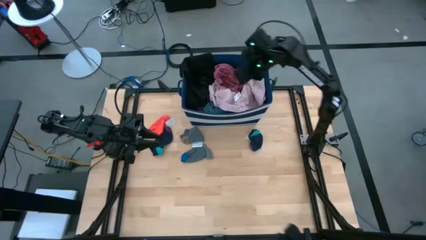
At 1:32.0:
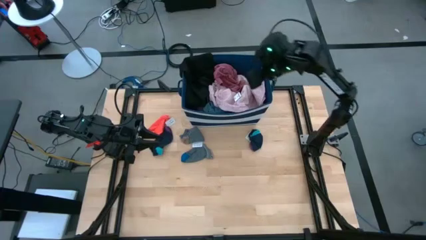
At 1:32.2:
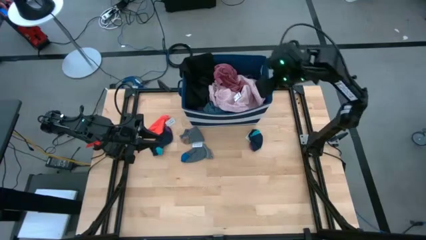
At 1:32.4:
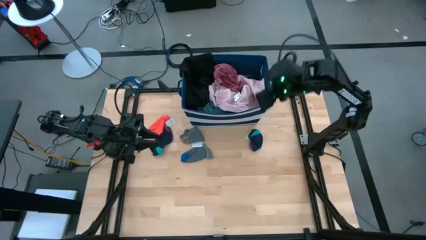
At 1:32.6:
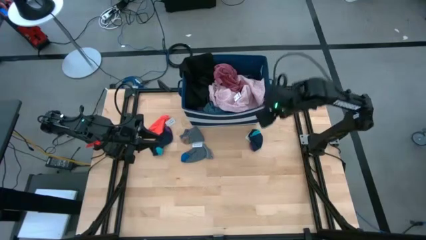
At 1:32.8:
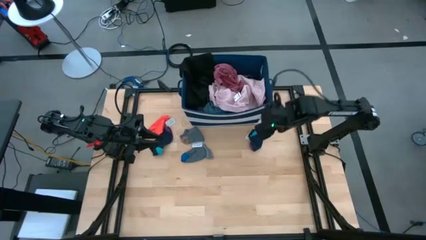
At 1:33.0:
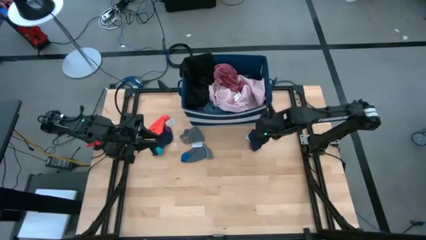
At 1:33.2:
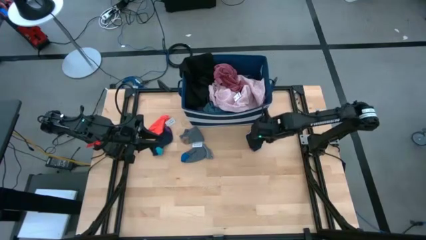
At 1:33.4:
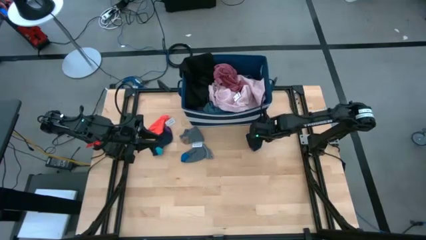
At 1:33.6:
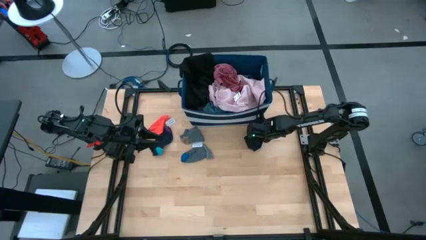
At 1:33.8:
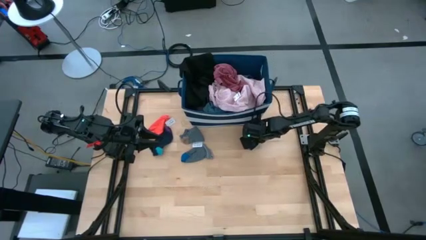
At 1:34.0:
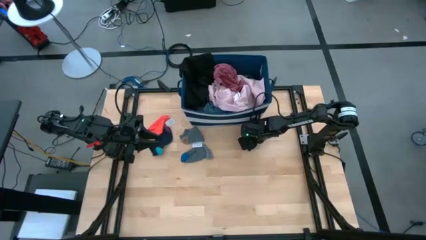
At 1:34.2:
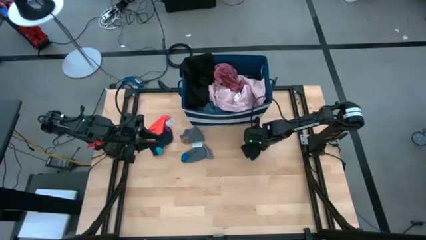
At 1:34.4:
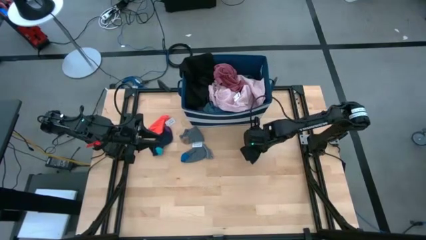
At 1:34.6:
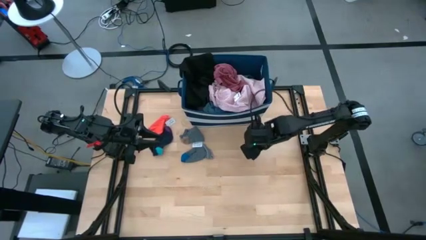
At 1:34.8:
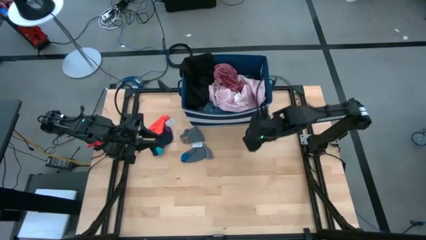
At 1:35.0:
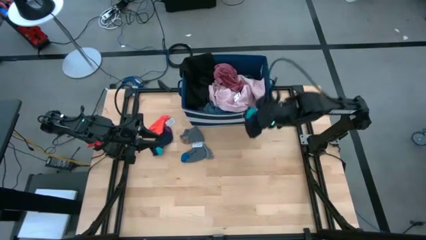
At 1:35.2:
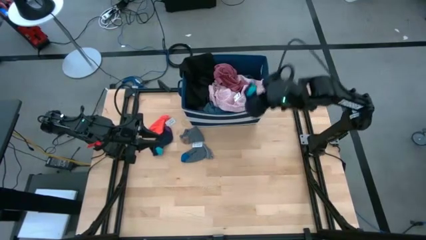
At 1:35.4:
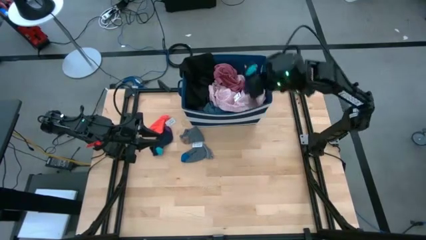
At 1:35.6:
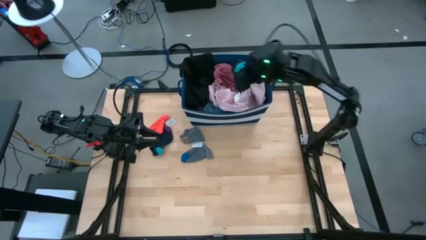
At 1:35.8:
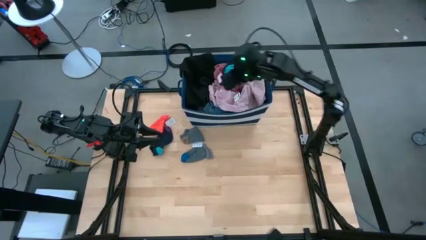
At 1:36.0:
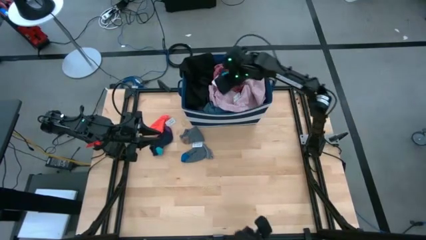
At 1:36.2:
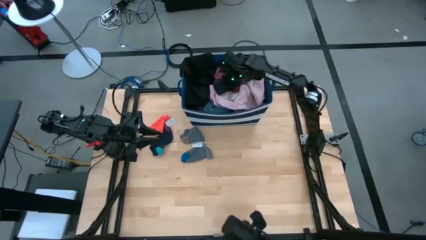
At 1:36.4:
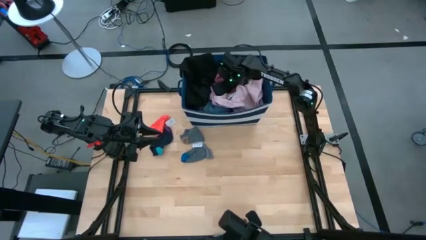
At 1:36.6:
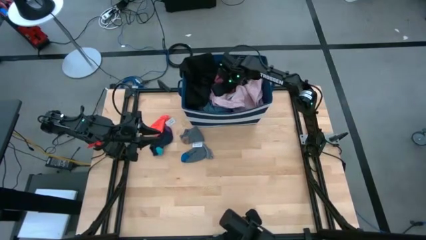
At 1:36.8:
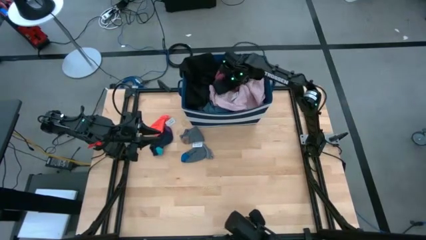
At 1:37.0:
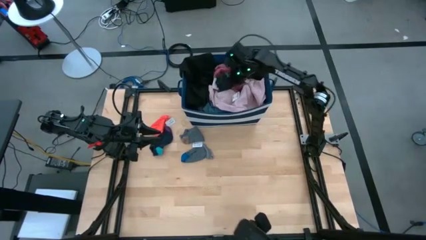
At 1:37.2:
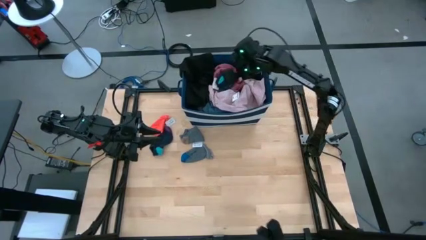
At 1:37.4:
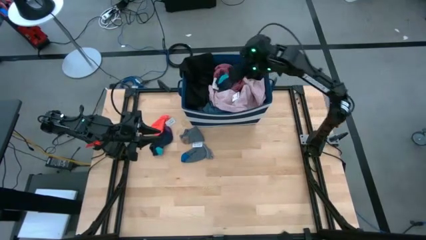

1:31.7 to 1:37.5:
Task: Sort clothes
Put the black sock into the blue bin

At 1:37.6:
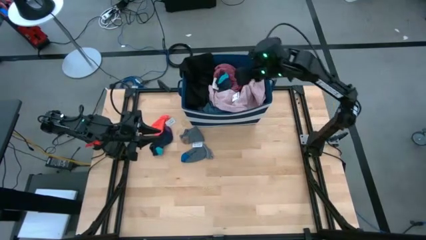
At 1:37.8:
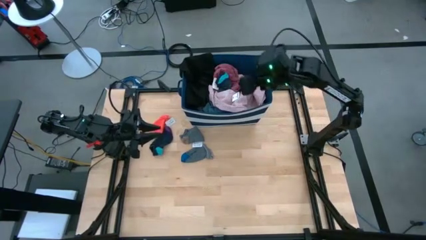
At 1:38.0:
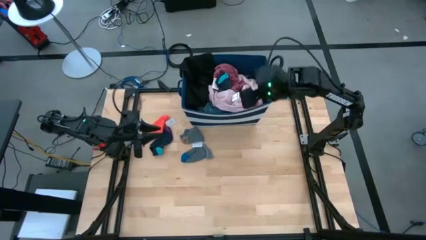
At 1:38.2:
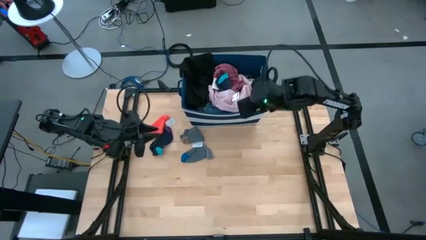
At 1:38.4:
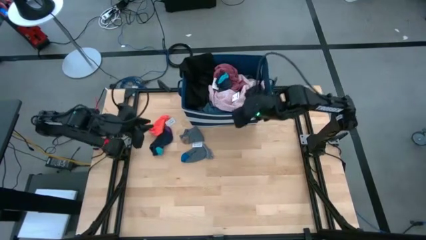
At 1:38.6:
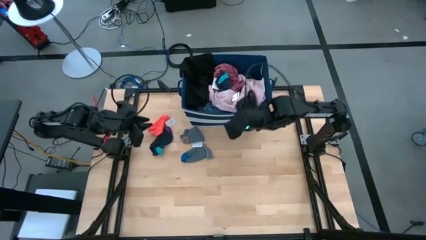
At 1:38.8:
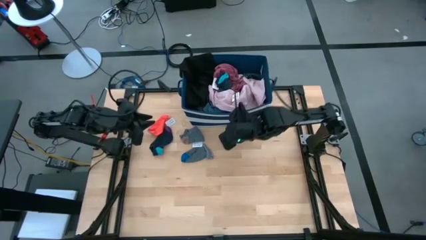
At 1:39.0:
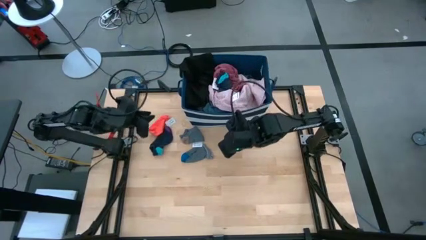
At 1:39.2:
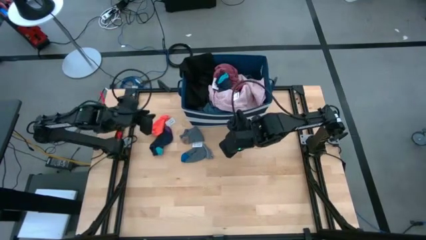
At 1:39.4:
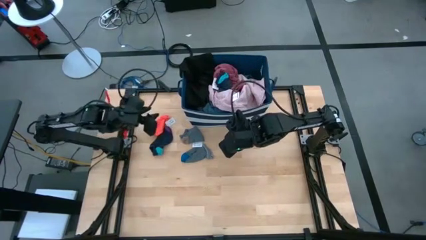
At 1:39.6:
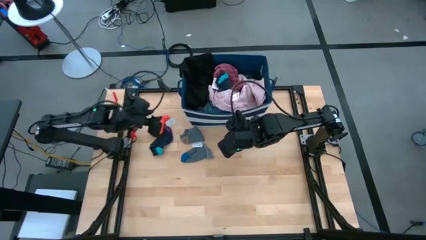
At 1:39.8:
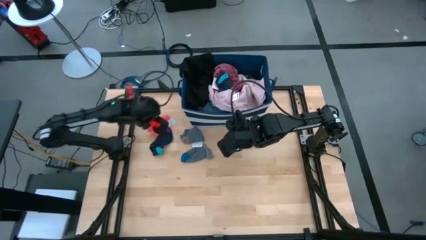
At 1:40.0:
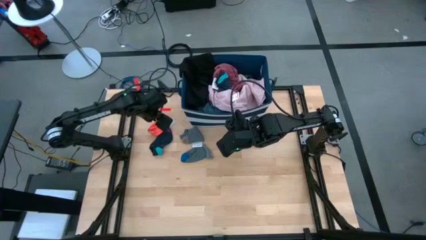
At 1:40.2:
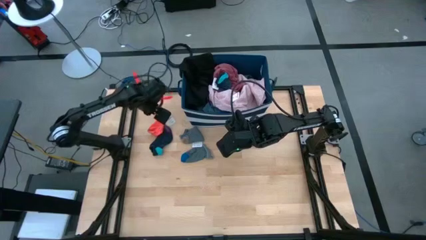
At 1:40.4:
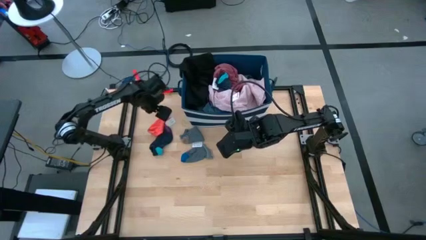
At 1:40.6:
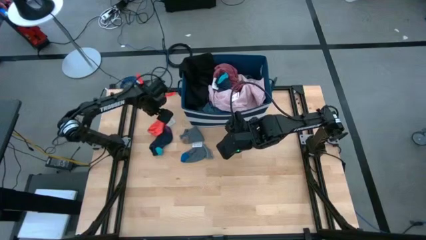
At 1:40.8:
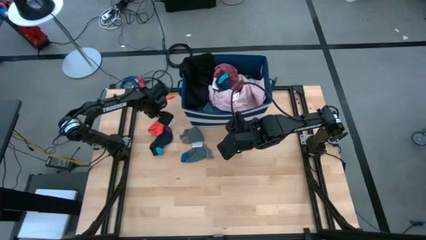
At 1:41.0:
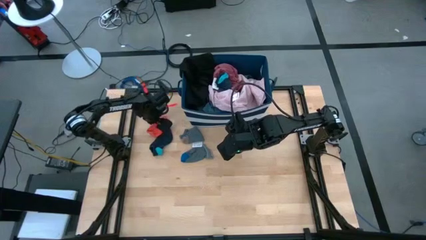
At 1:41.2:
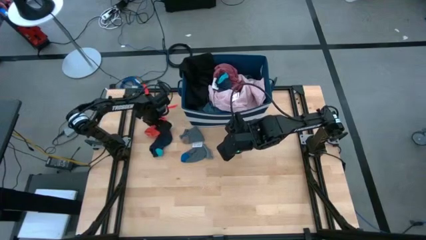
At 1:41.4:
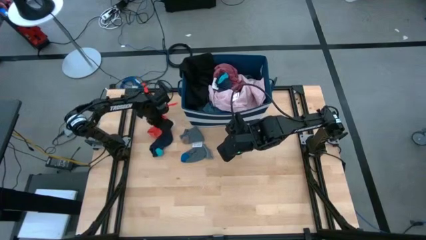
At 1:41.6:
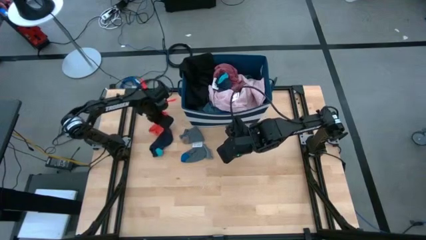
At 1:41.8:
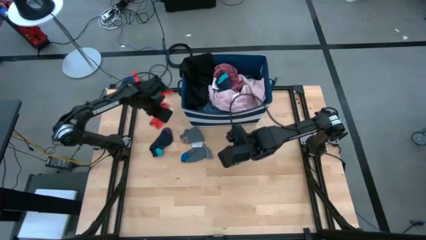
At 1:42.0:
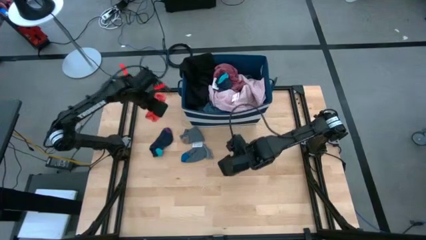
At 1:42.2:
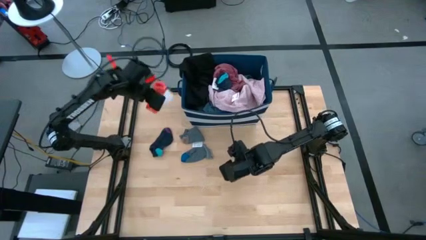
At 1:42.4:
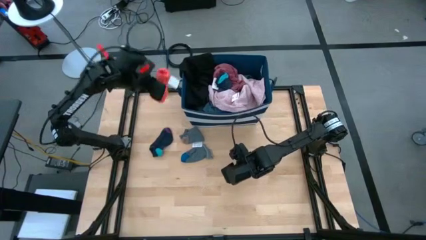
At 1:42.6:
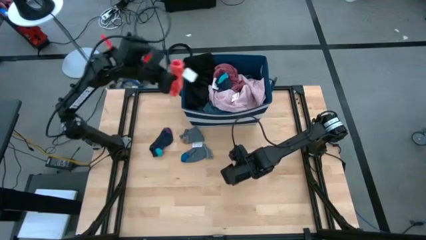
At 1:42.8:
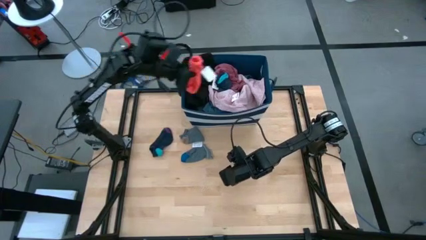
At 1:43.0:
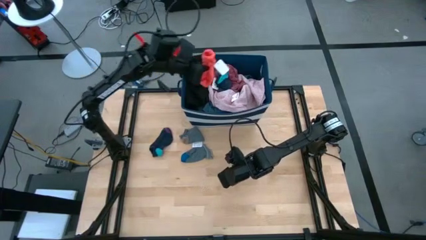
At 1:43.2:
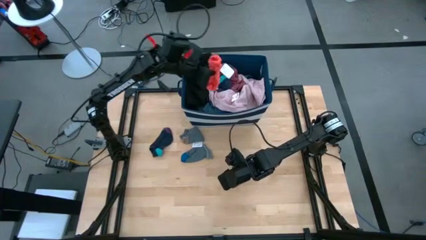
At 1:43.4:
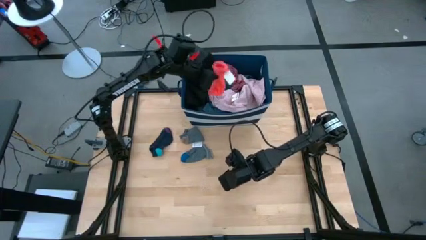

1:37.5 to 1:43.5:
Put the orange sock into the blue bin

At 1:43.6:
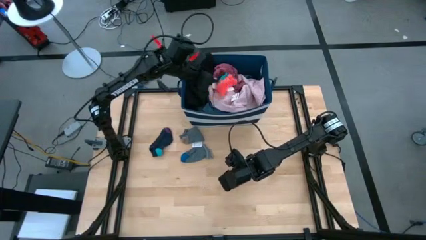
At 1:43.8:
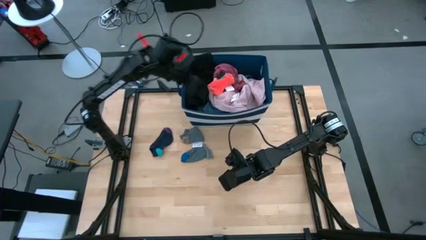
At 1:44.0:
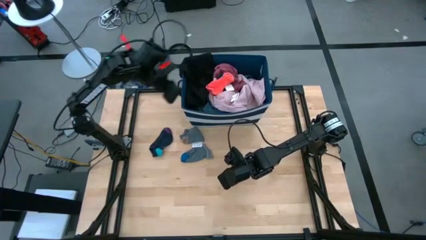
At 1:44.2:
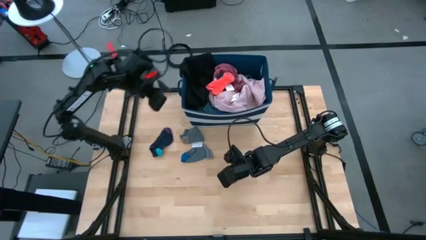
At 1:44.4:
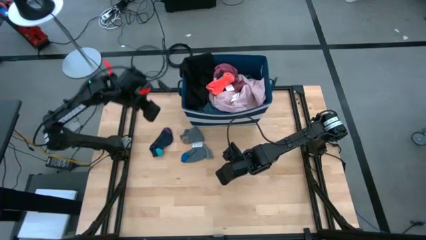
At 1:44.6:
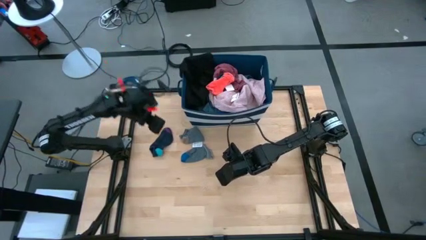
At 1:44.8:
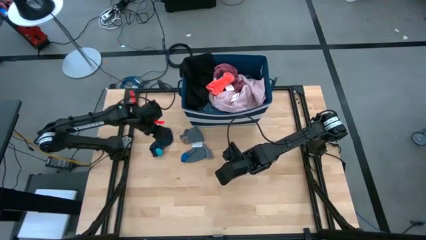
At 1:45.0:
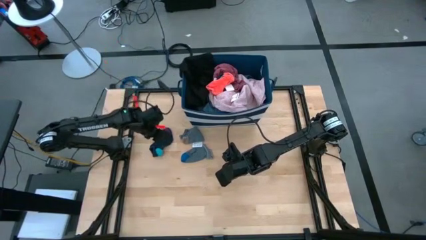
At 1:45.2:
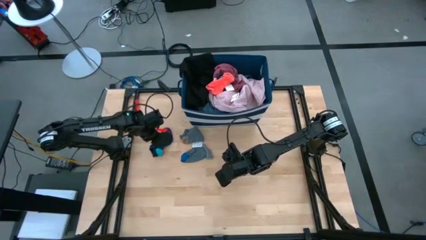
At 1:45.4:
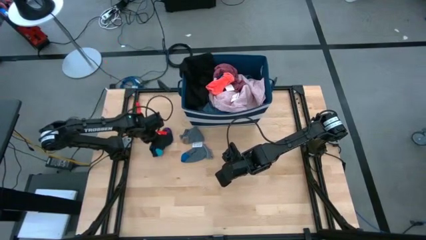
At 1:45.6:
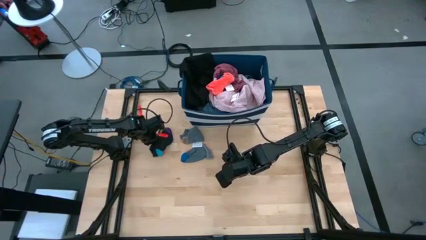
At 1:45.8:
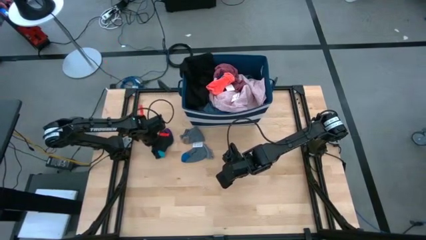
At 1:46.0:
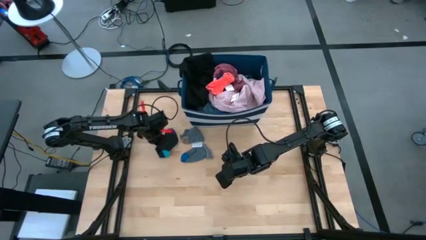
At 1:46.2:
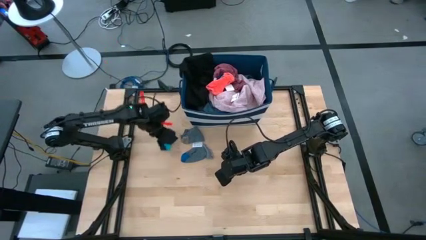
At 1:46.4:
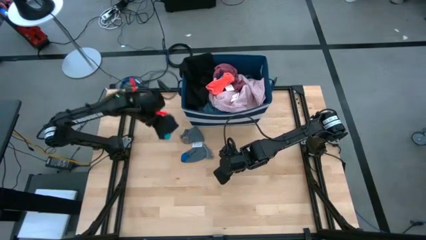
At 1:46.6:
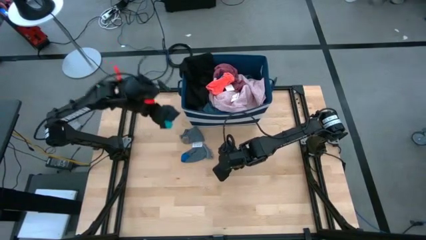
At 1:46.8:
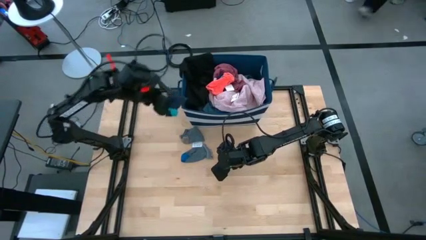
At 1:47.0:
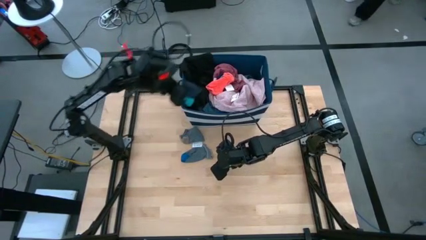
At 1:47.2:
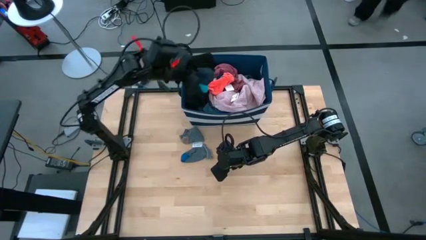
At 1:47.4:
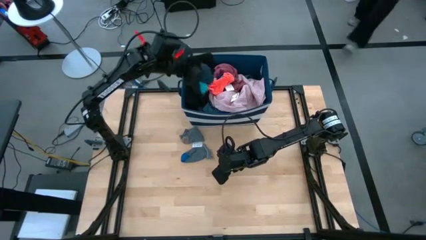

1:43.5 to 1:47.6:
Put the black sock into the blue bin
